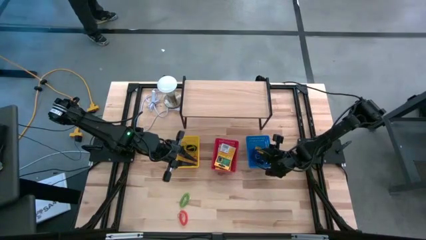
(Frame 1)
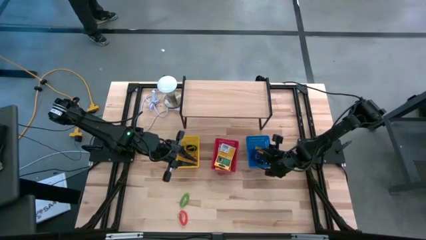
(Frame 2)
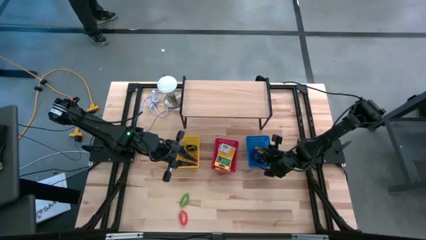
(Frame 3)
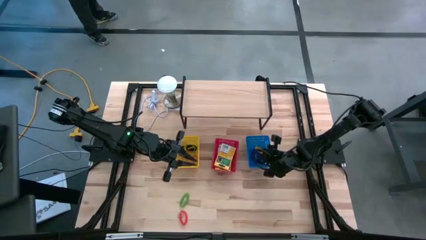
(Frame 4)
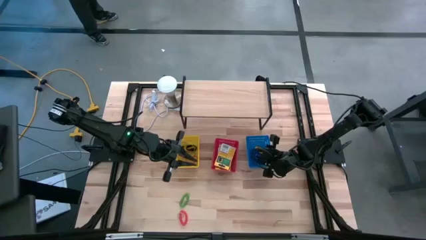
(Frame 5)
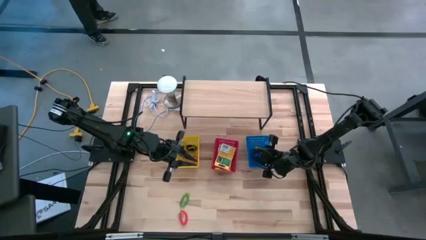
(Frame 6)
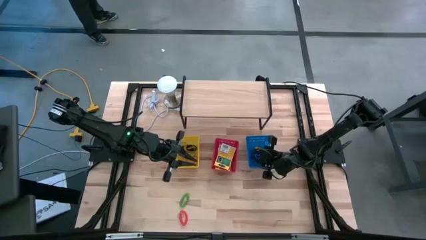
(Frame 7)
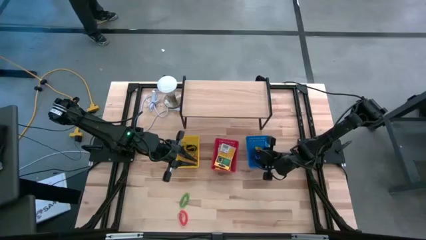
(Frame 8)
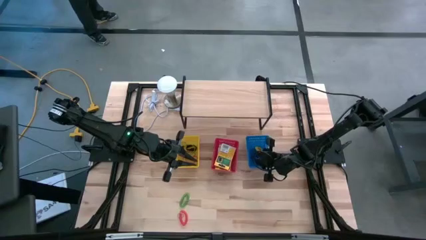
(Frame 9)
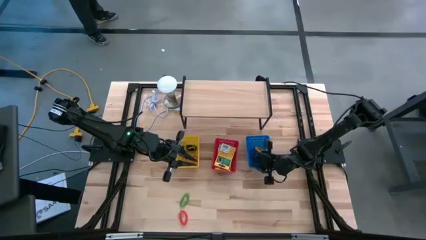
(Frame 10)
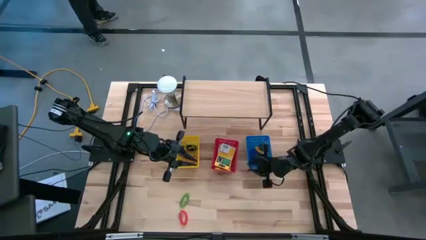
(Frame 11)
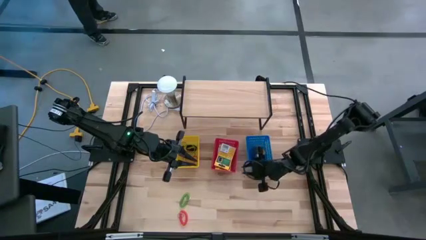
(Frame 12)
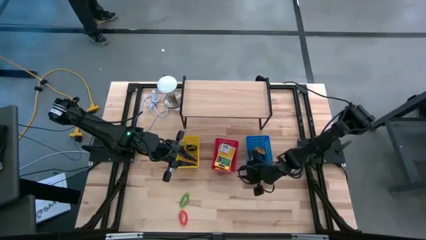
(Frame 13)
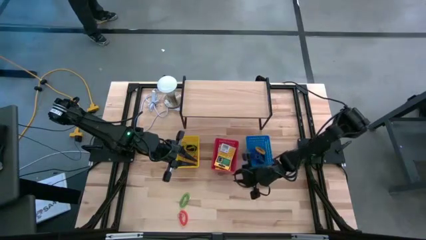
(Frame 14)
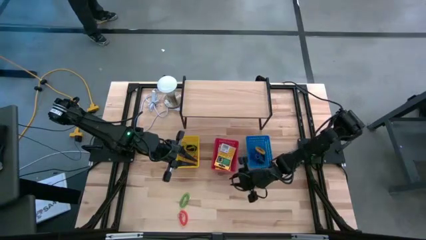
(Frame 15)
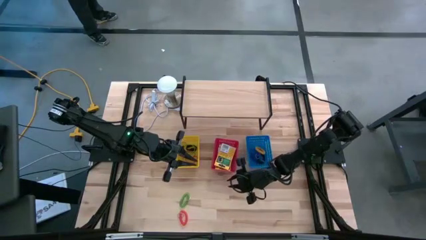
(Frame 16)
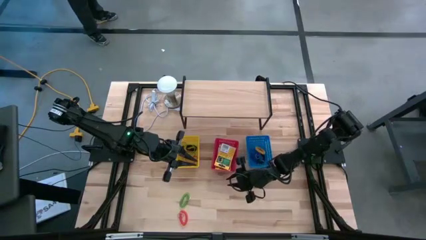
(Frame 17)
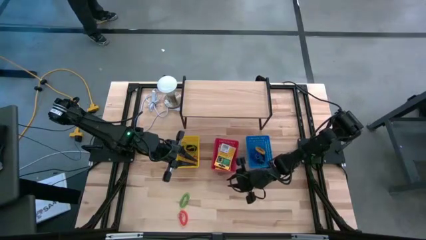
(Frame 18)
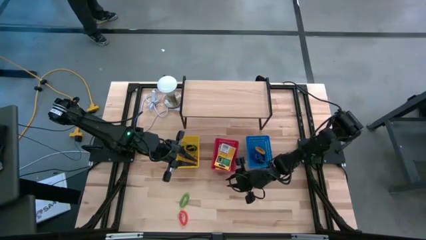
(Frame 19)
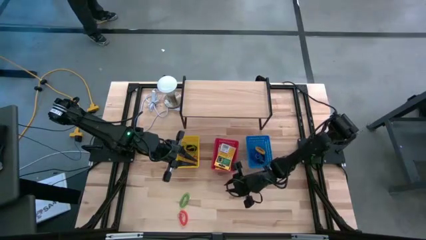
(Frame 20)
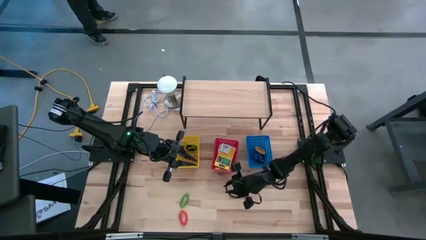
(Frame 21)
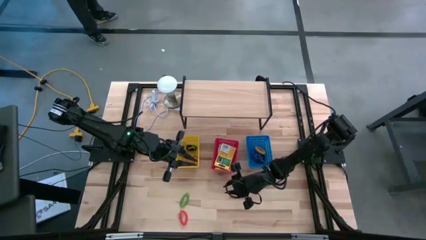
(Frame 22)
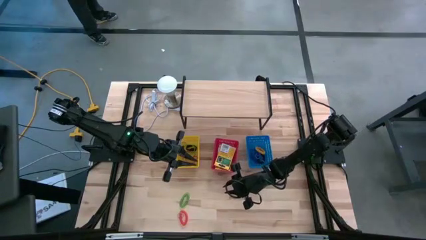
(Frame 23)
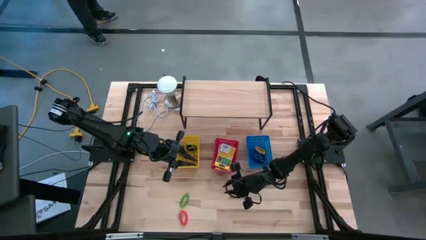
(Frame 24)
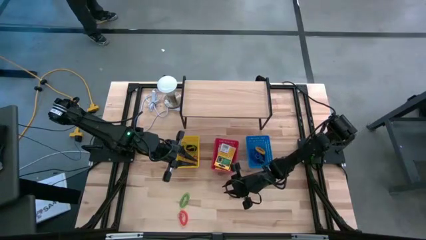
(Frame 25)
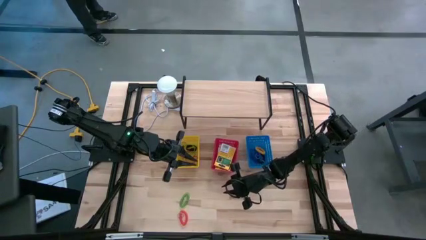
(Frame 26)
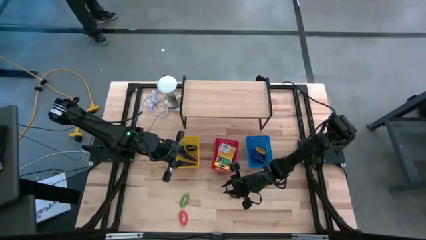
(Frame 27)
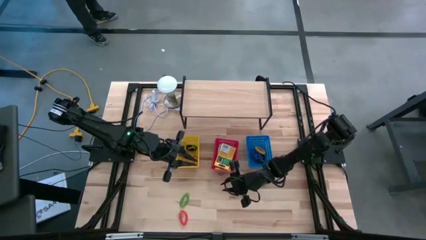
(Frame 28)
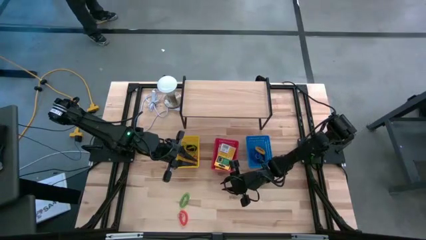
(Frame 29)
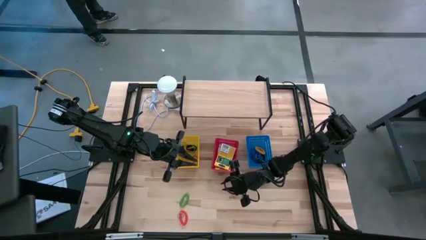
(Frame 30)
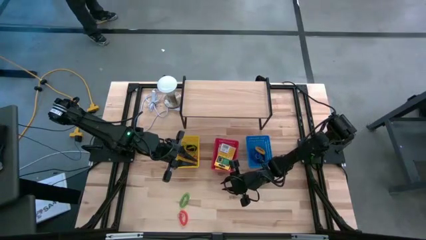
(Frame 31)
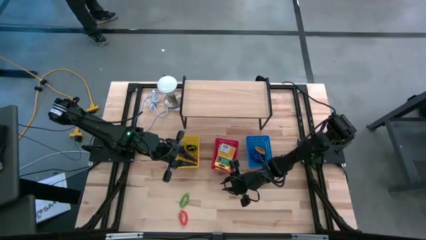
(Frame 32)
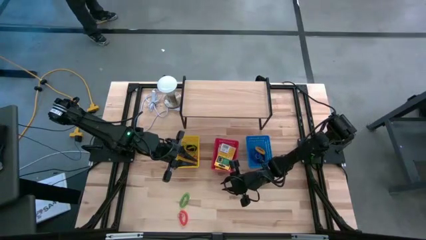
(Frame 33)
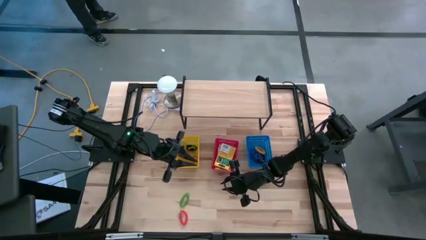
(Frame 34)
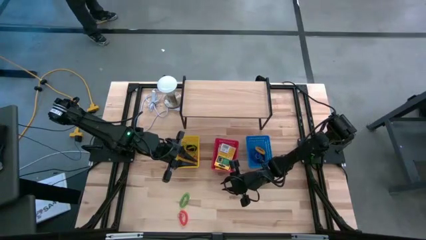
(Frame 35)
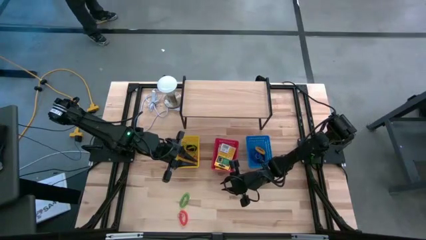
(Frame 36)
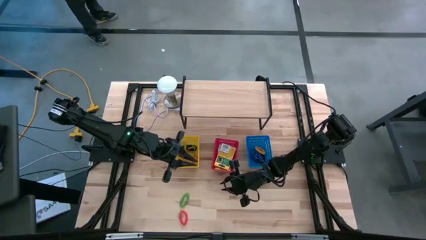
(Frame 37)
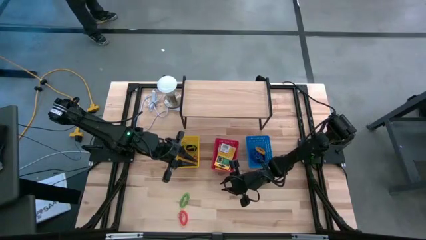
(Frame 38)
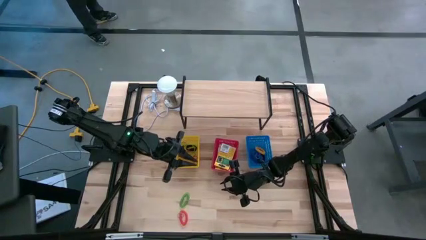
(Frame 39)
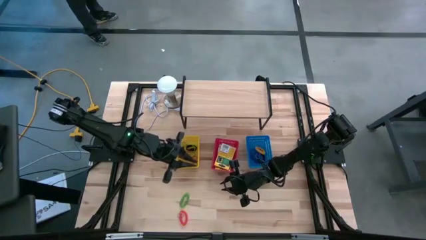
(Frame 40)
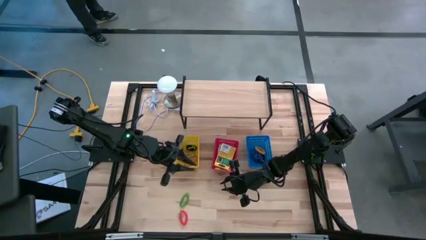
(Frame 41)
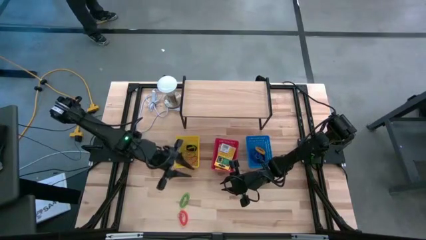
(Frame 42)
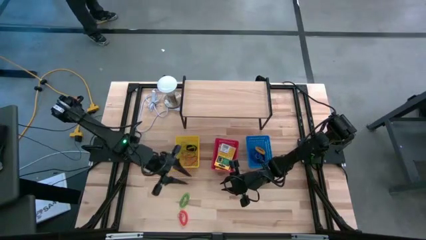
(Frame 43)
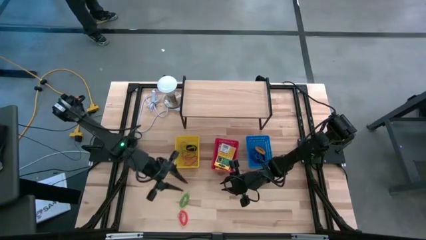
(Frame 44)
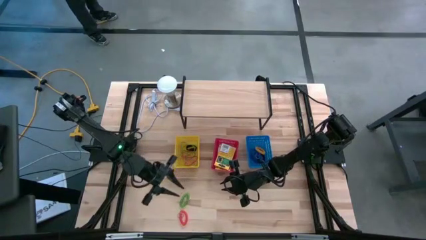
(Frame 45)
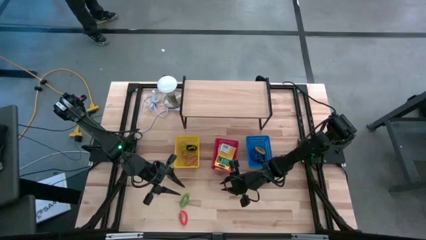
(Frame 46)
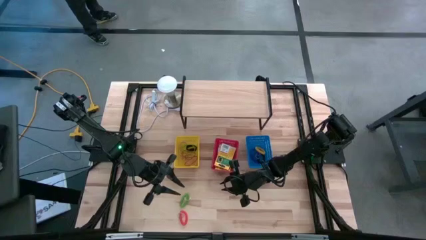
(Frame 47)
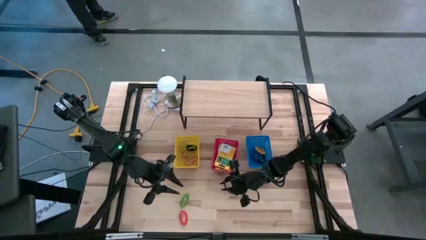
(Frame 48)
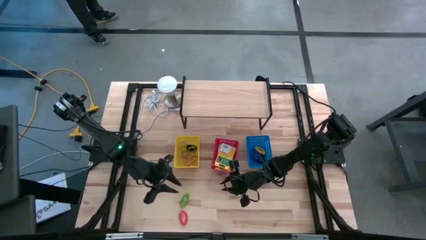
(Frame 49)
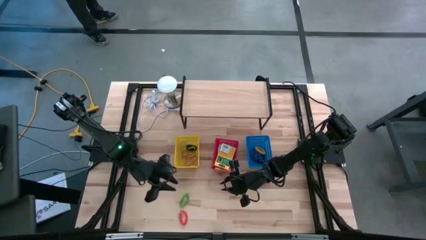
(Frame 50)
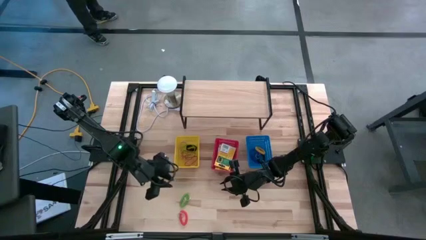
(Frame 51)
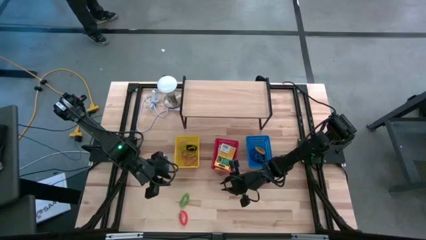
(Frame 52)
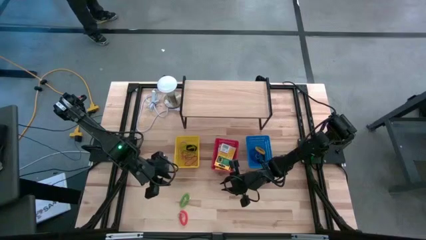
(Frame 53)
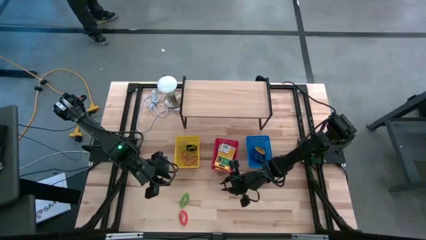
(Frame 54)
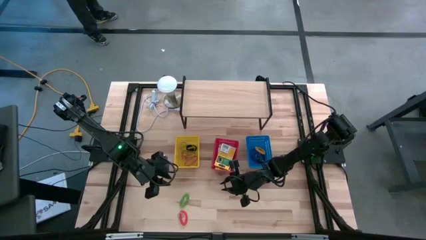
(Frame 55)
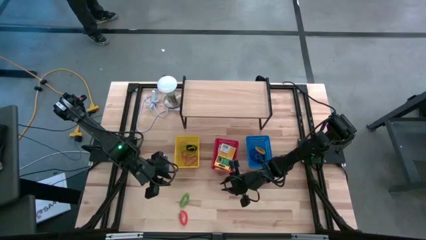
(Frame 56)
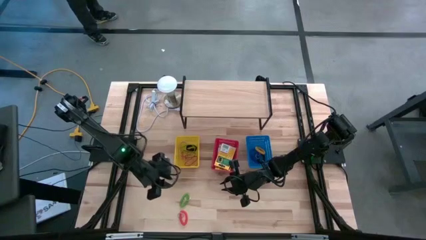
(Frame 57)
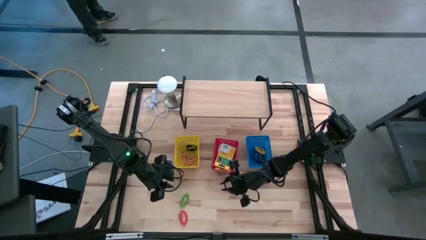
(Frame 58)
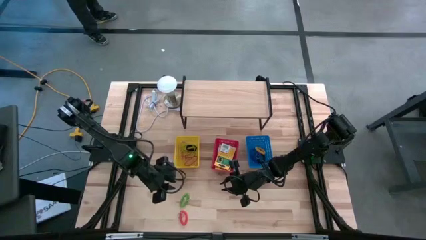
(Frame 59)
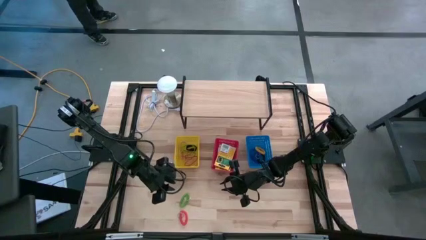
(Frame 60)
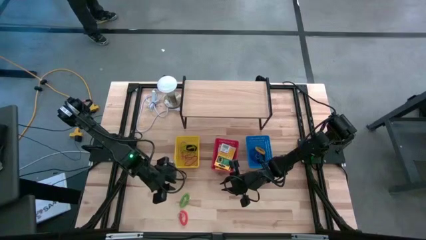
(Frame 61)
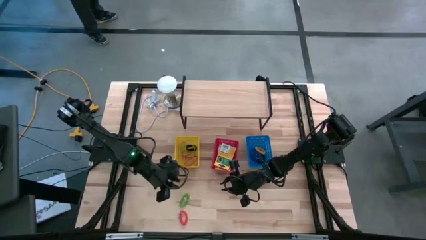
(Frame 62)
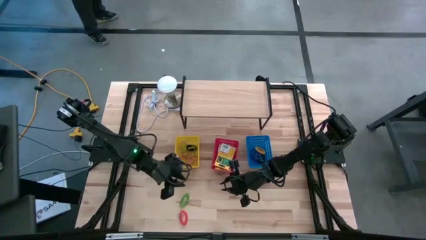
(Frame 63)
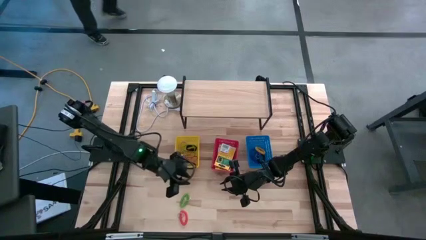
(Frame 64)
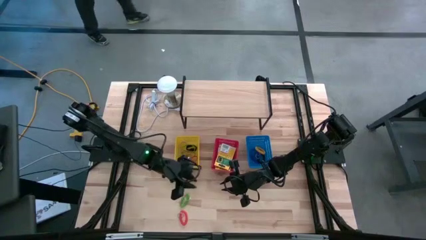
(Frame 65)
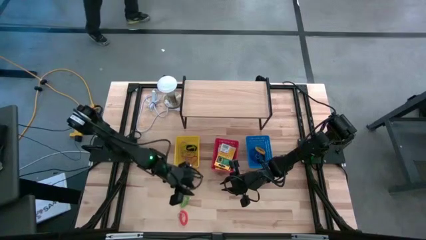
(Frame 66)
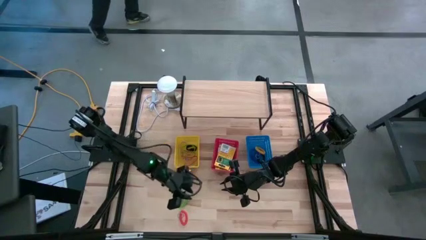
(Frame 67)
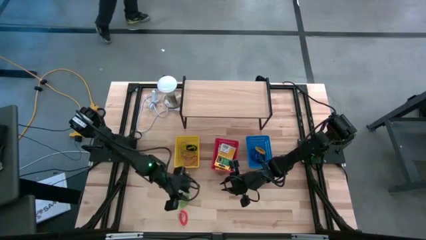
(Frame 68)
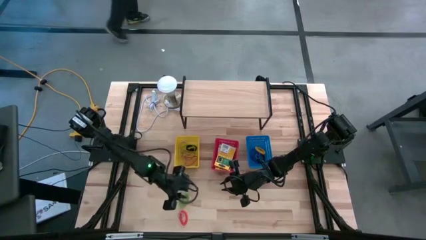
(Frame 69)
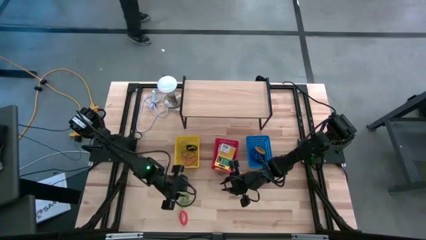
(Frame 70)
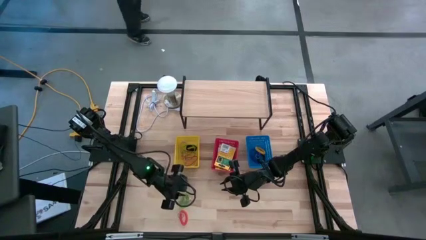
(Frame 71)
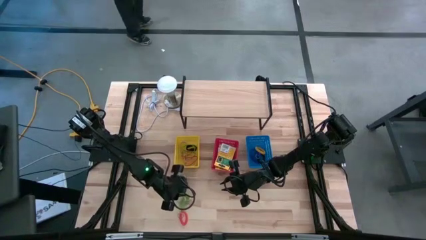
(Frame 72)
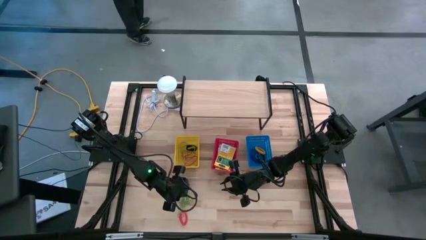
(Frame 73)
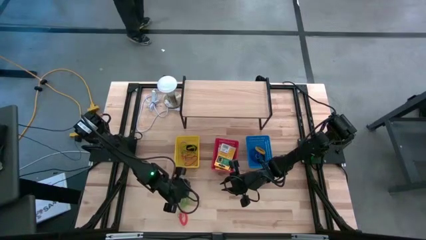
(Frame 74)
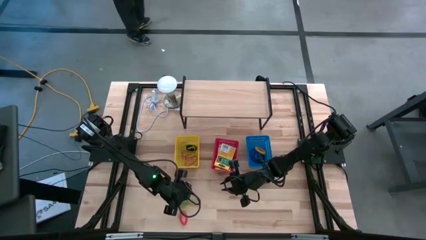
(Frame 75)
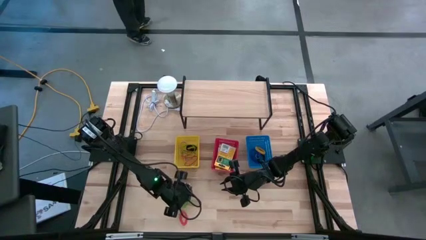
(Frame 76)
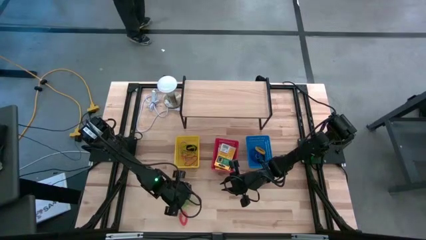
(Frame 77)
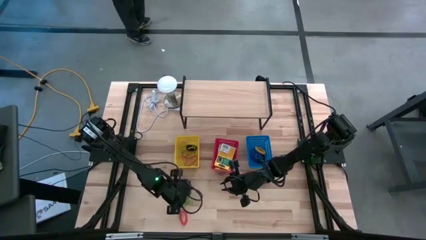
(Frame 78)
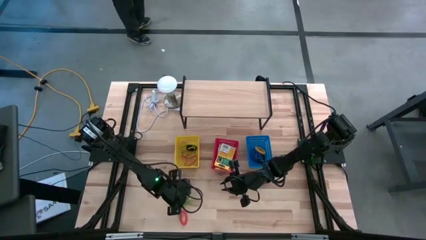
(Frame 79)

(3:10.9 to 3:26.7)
Task: Pick & Place Office Desk Supplies
Put the green spiral keychain into the blue bin
